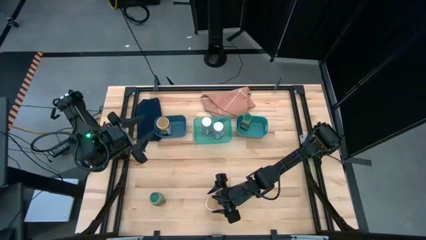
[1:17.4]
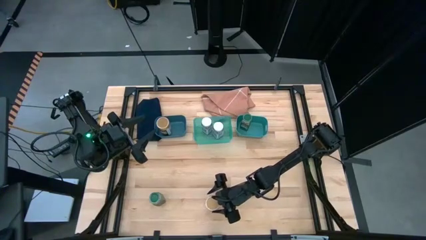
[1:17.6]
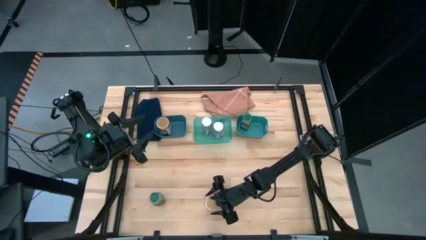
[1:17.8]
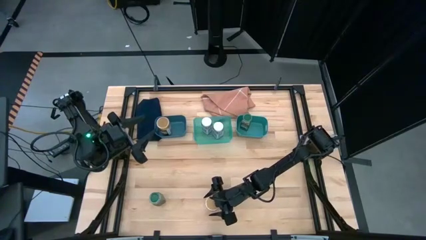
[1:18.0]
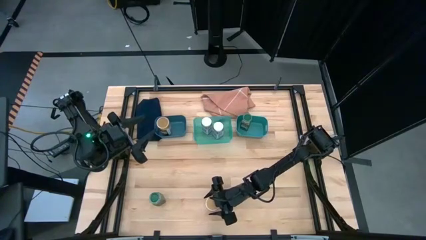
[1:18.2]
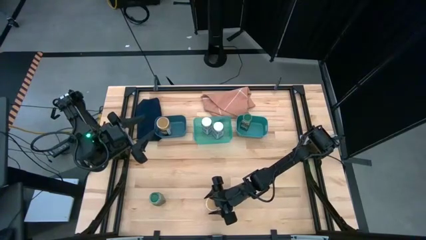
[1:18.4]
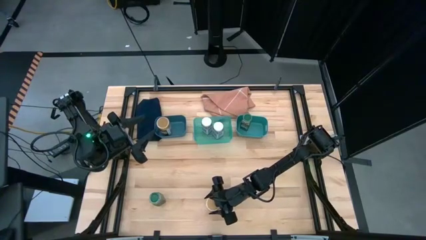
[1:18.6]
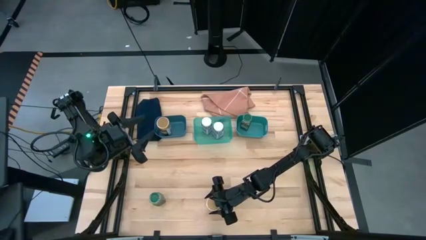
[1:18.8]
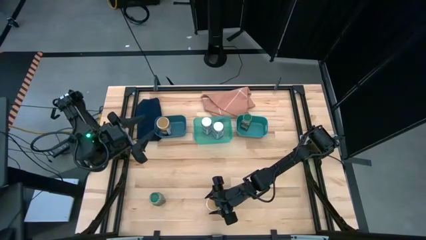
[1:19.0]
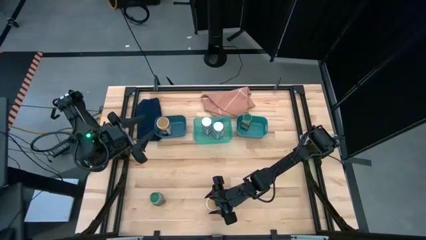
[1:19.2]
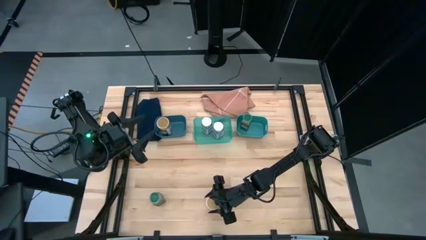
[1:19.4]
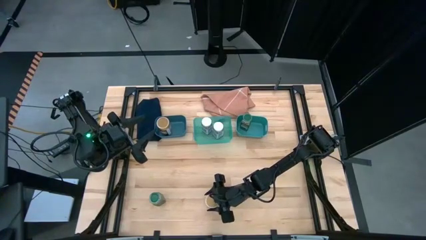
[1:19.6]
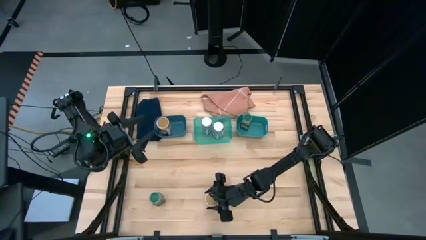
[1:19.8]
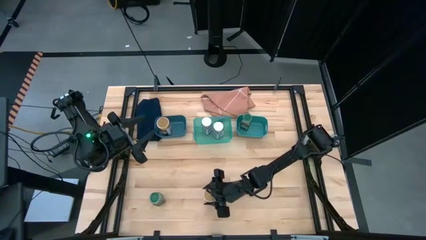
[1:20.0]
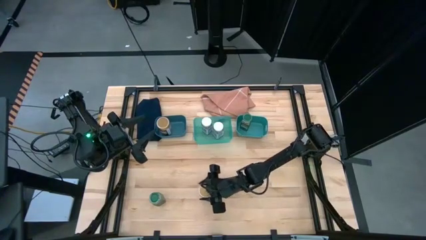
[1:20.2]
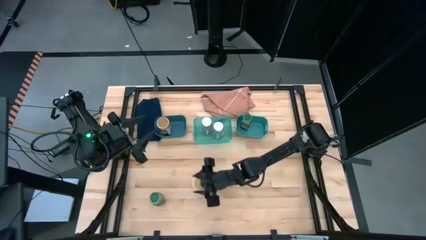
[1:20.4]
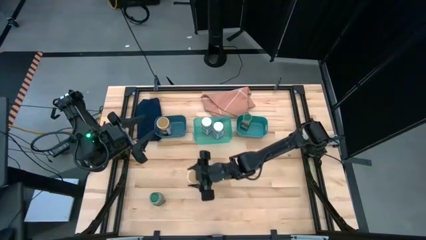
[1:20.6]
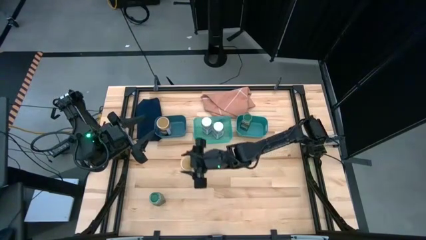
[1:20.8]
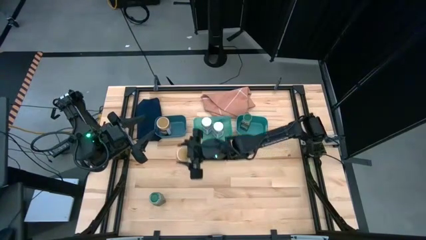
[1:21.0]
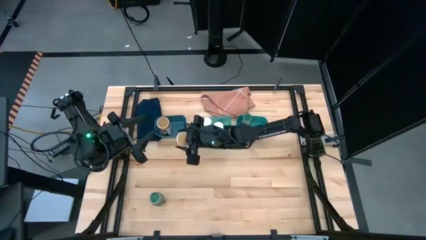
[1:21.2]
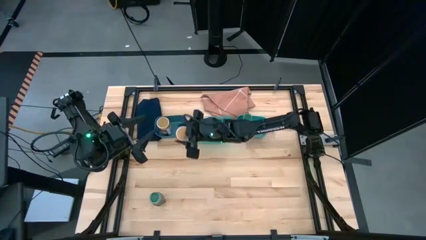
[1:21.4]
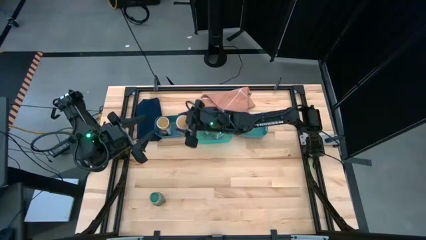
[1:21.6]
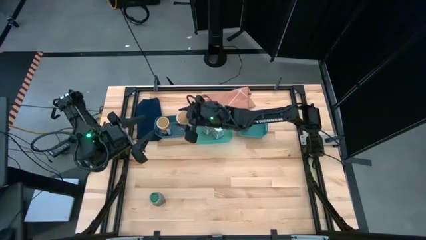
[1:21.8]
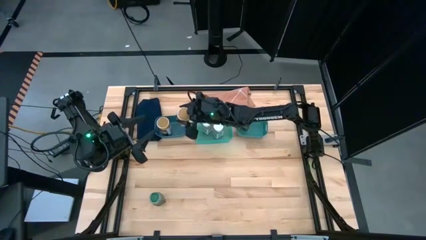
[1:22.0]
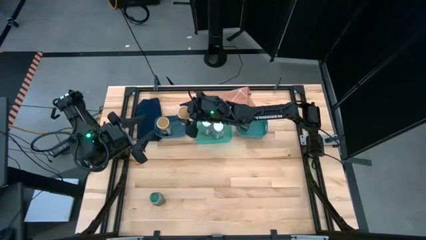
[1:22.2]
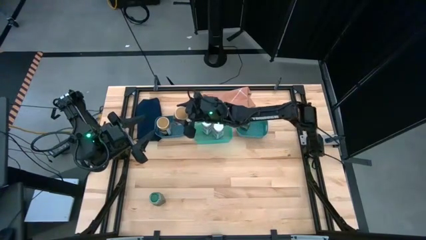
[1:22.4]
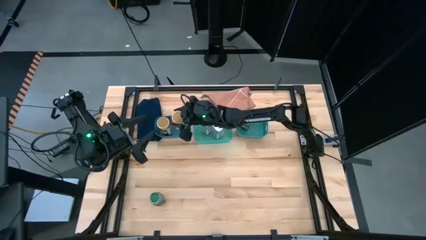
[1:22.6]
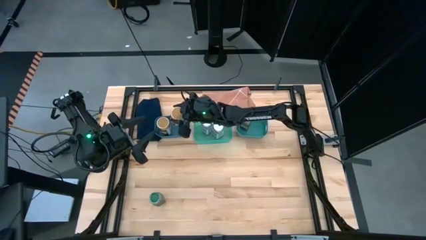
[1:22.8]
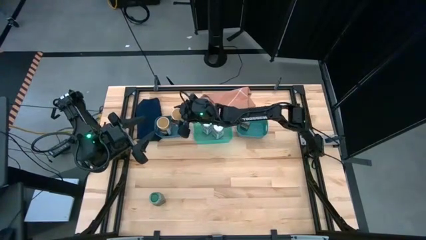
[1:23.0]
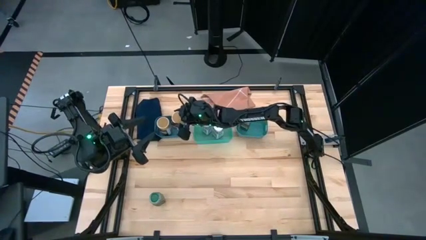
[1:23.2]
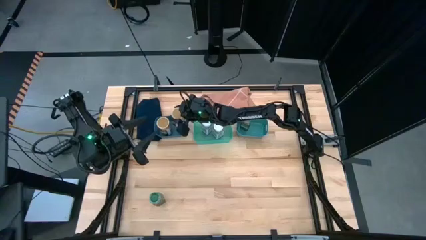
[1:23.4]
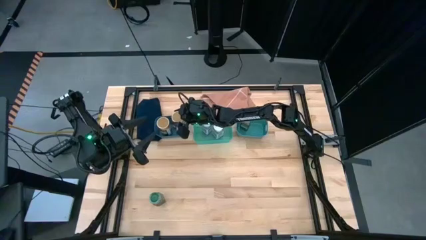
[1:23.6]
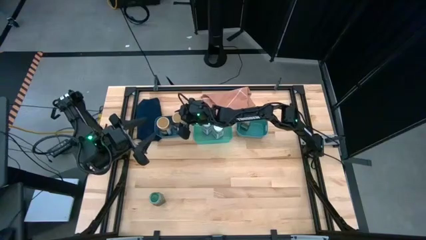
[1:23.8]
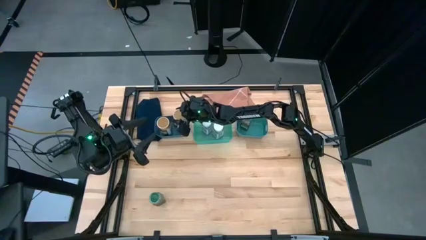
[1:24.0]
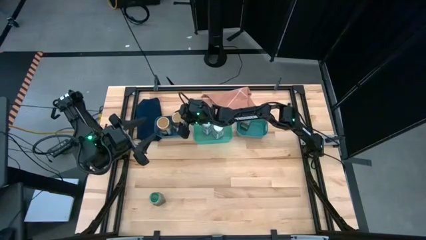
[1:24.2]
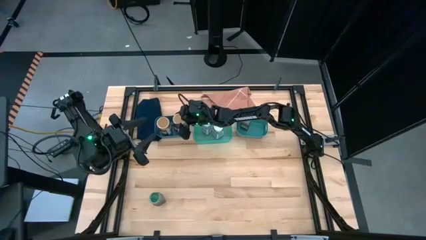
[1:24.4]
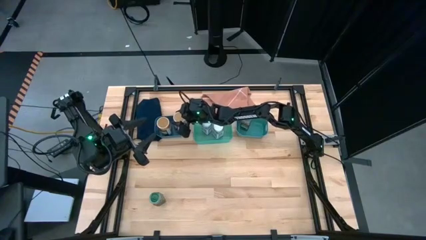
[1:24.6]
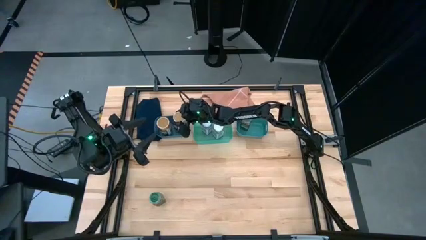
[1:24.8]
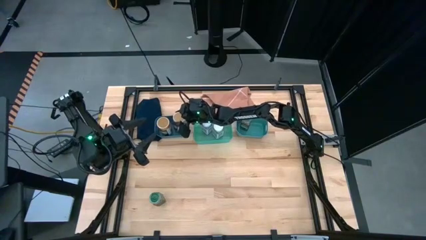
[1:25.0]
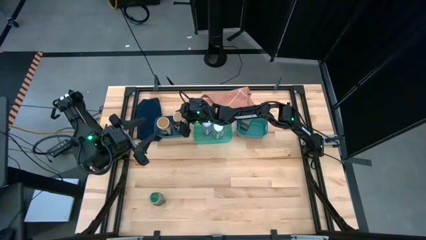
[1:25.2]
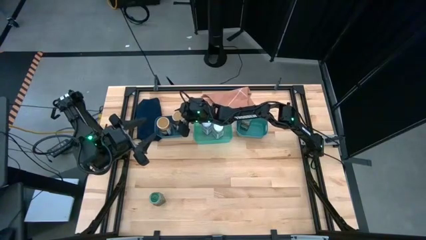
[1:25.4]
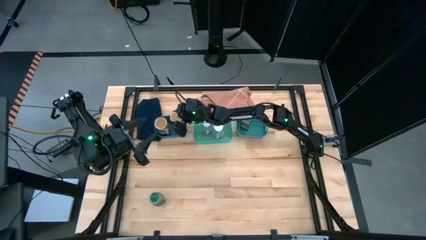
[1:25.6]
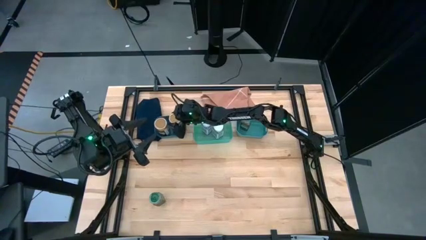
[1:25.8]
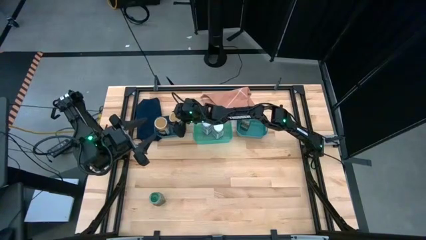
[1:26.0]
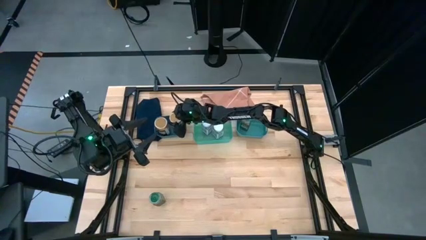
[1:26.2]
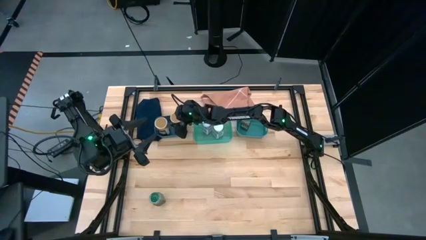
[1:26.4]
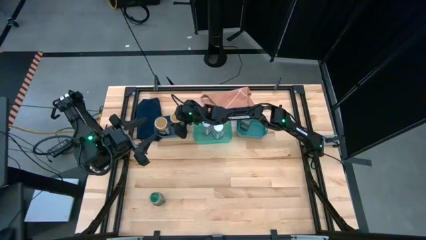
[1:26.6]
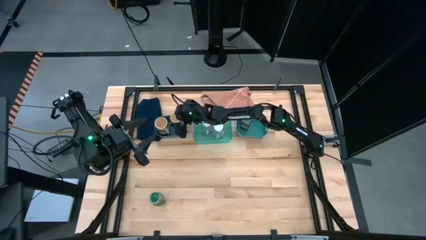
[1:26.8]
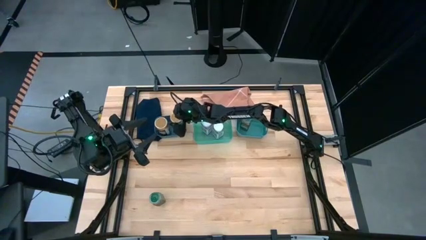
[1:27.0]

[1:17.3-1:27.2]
Task: Sort spices by type
Put the gold seasoning bottle into the blue bin

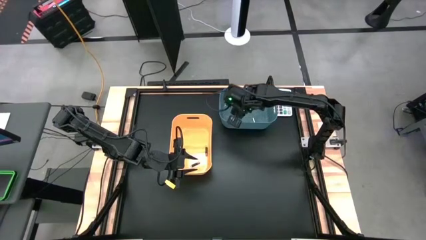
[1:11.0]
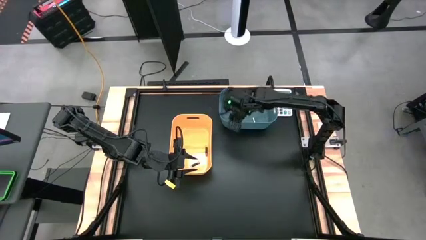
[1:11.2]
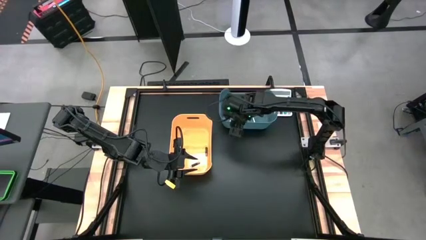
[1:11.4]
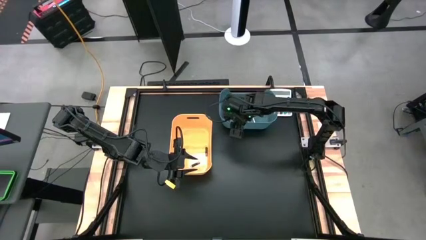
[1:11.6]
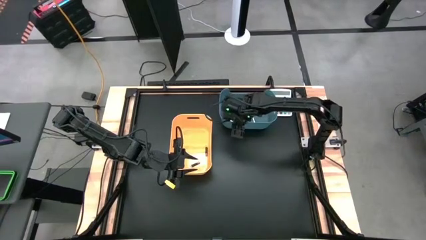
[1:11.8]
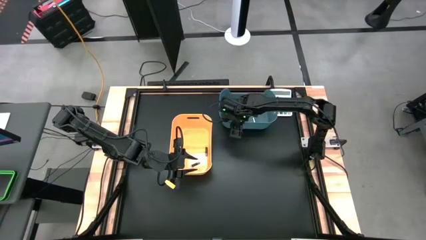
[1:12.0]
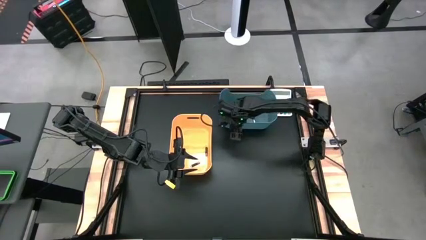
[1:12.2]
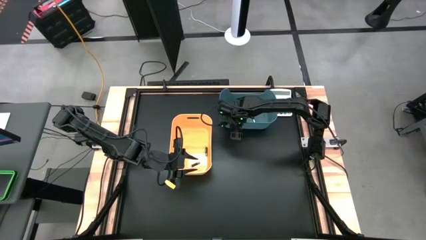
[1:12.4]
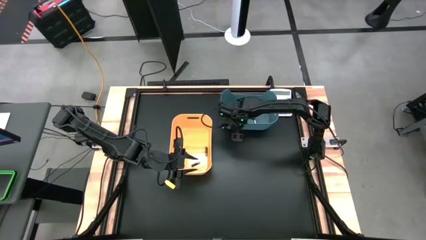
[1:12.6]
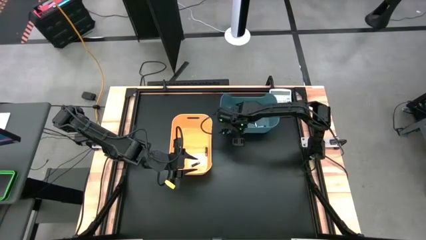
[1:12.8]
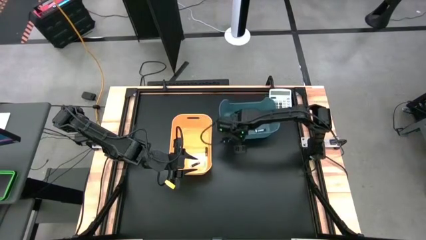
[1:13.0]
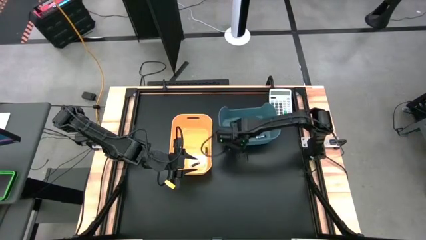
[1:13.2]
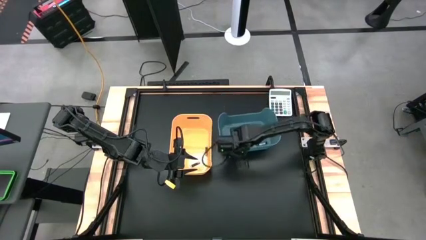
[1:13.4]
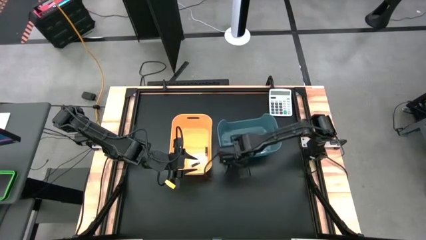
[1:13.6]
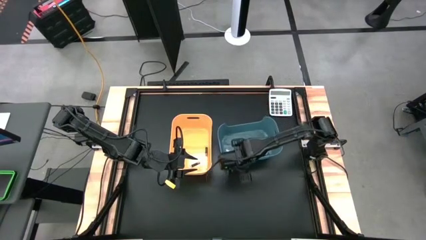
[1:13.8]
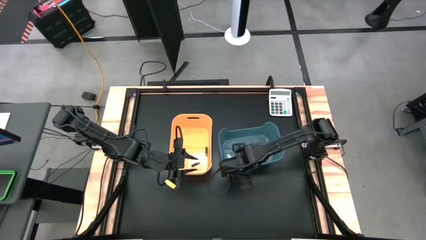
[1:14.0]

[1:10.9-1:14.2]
Task: Sort batteries
Move the blue bin on the right side of the yellow bin
